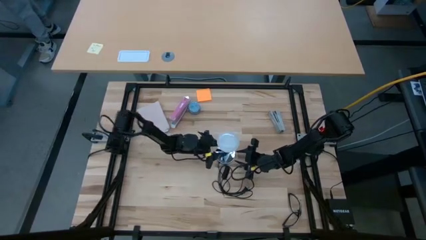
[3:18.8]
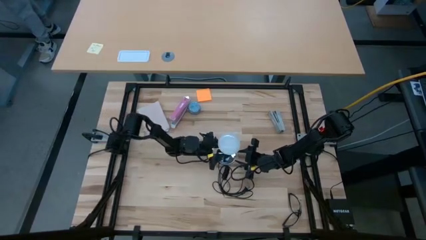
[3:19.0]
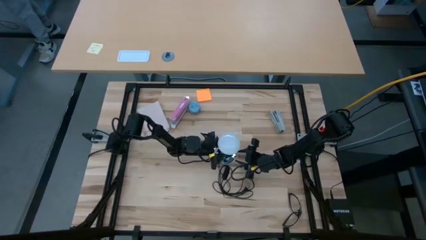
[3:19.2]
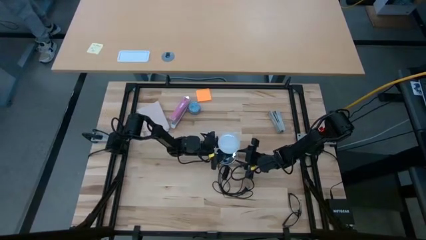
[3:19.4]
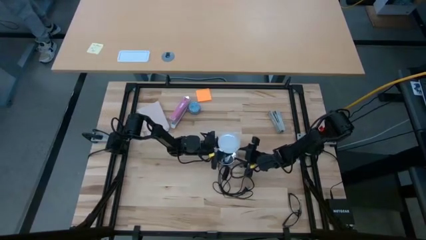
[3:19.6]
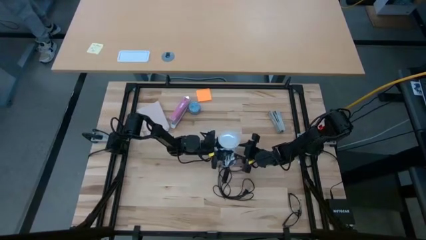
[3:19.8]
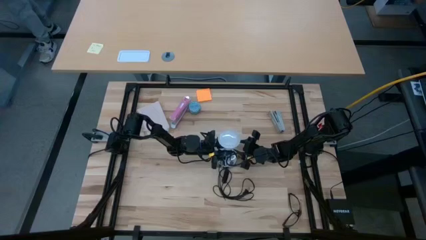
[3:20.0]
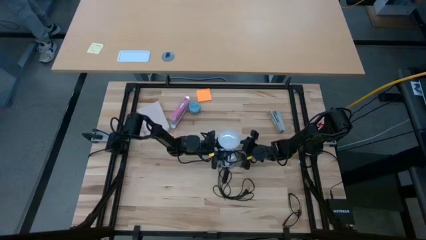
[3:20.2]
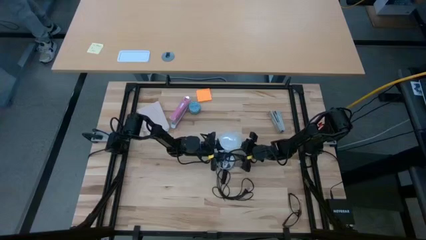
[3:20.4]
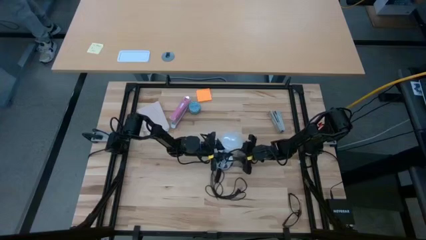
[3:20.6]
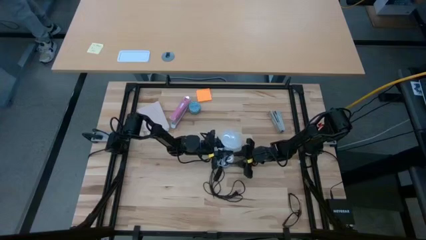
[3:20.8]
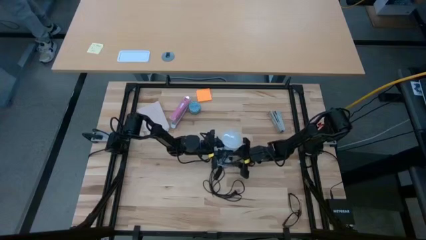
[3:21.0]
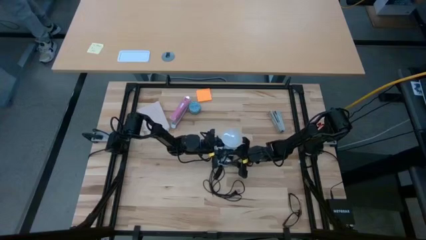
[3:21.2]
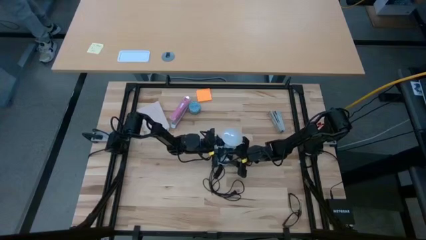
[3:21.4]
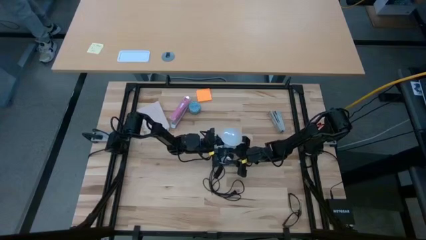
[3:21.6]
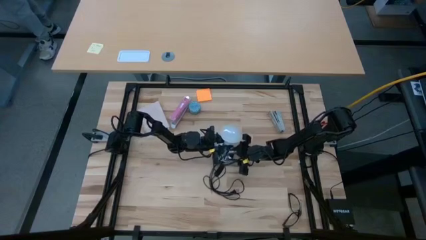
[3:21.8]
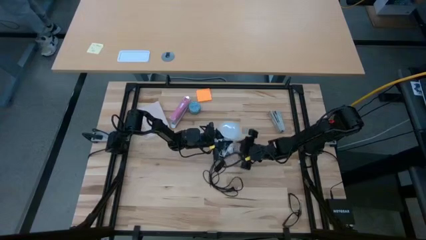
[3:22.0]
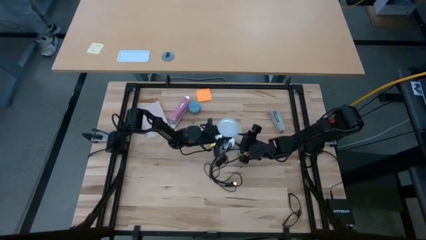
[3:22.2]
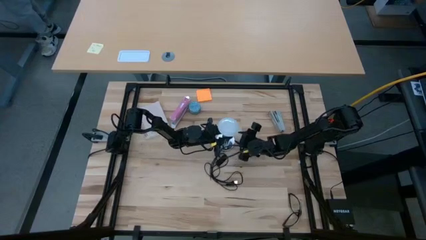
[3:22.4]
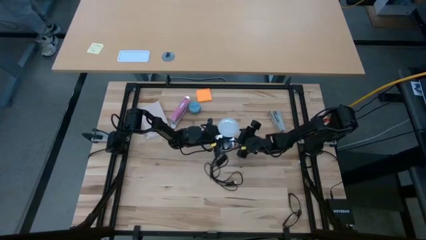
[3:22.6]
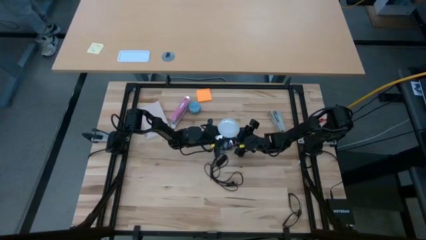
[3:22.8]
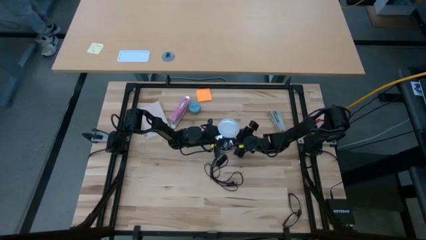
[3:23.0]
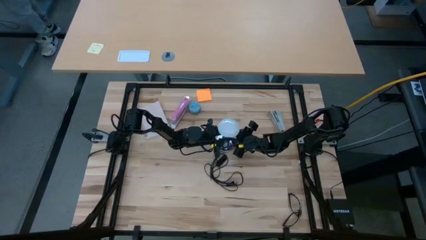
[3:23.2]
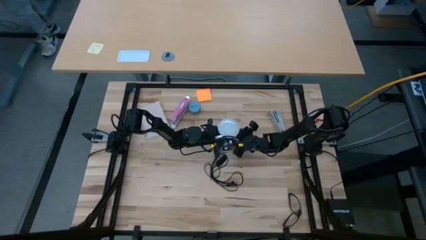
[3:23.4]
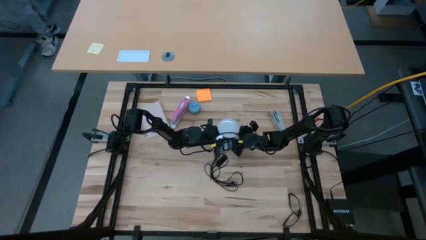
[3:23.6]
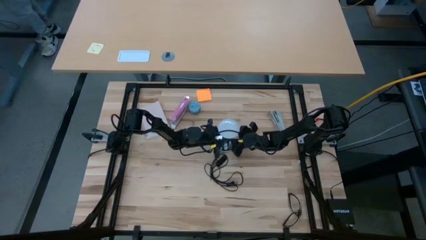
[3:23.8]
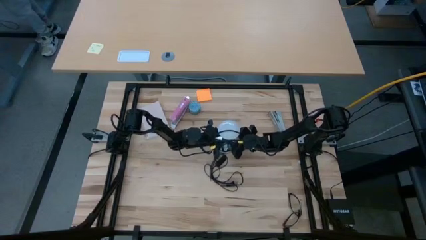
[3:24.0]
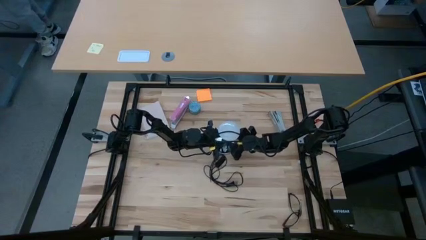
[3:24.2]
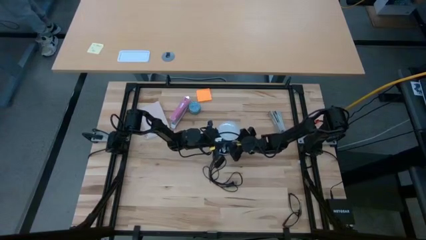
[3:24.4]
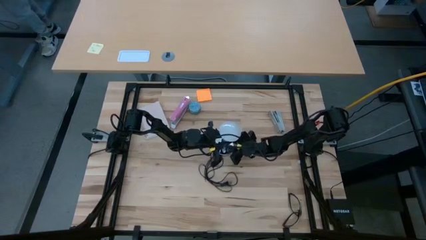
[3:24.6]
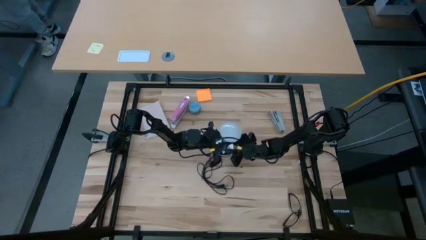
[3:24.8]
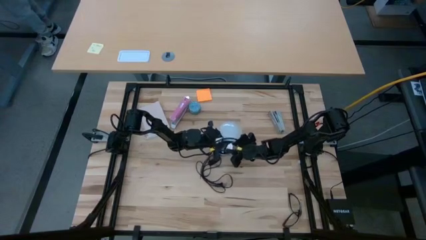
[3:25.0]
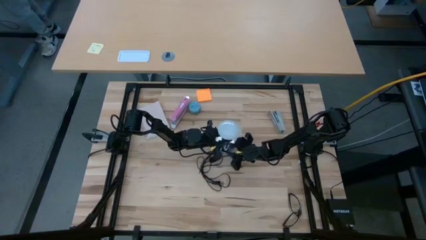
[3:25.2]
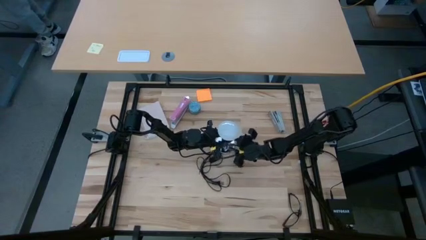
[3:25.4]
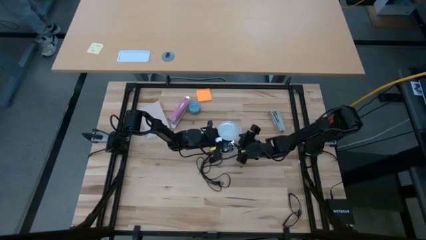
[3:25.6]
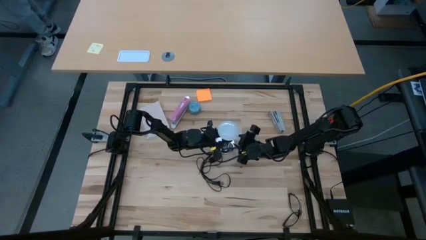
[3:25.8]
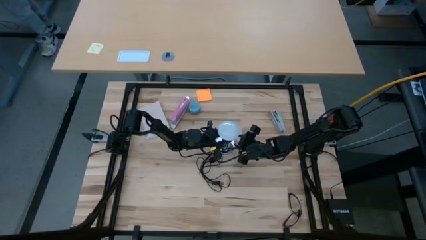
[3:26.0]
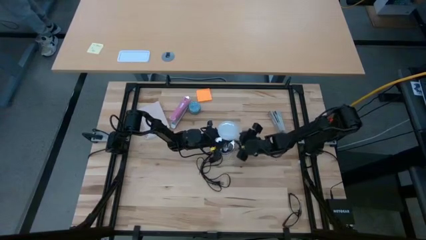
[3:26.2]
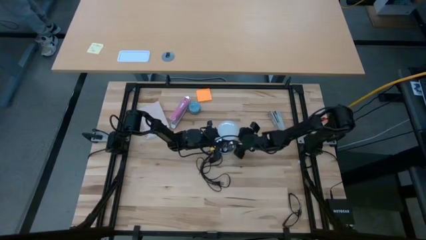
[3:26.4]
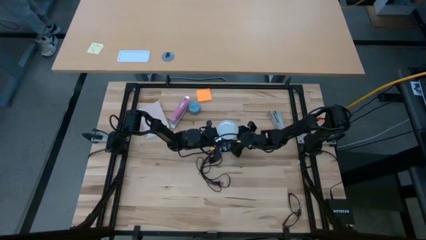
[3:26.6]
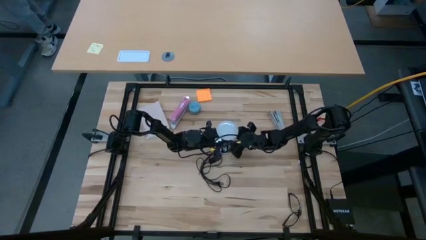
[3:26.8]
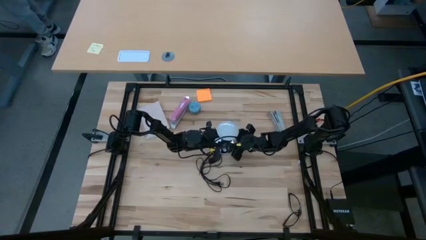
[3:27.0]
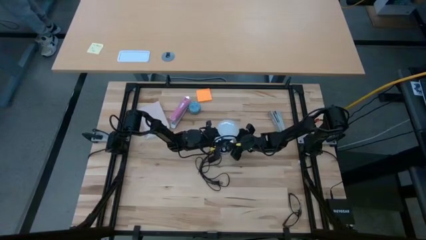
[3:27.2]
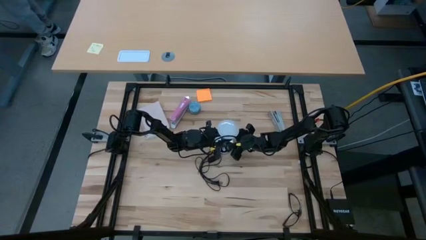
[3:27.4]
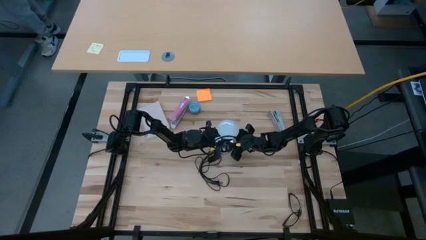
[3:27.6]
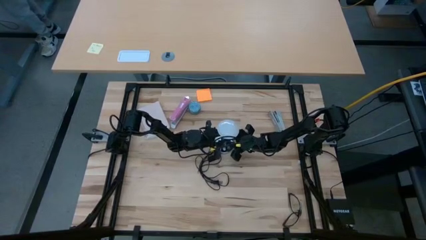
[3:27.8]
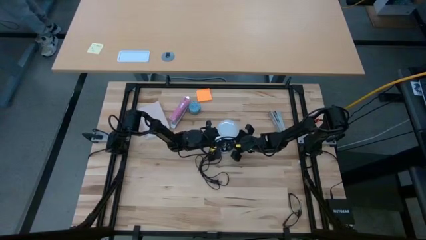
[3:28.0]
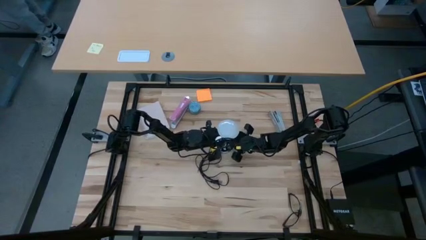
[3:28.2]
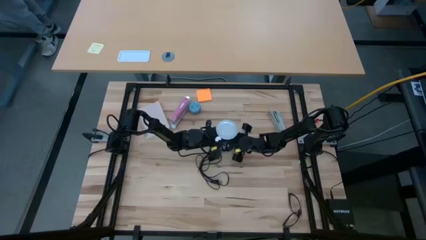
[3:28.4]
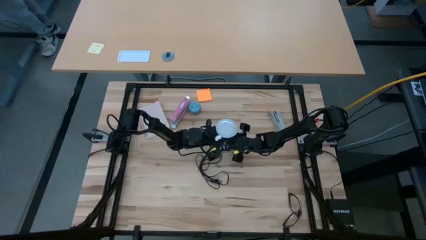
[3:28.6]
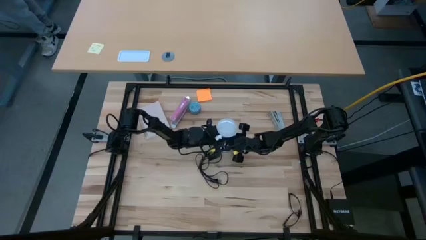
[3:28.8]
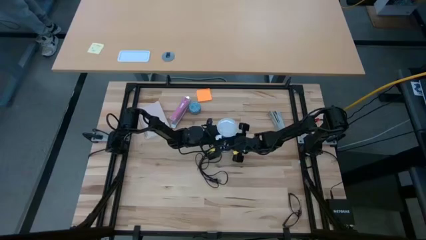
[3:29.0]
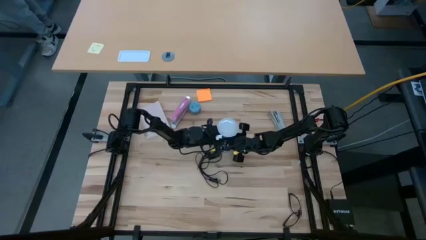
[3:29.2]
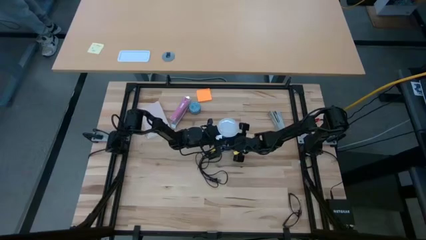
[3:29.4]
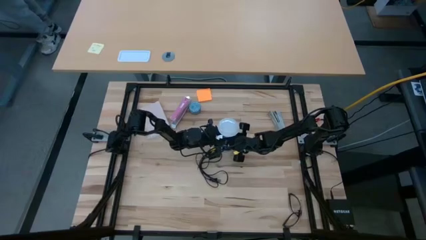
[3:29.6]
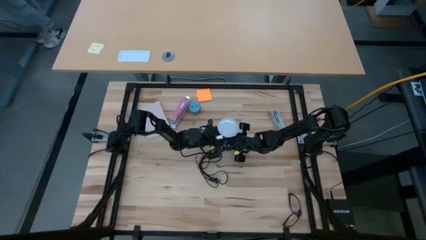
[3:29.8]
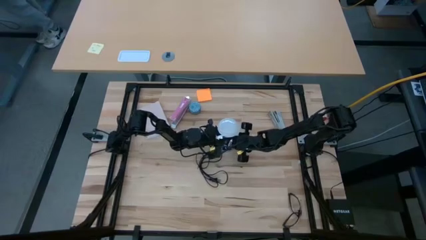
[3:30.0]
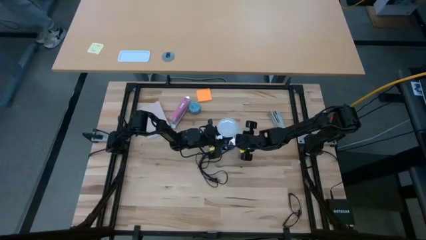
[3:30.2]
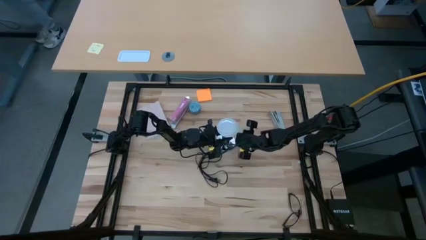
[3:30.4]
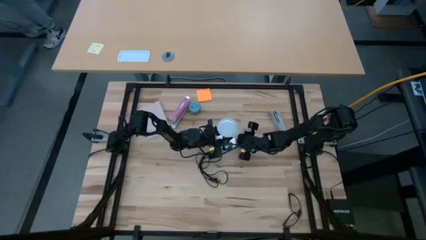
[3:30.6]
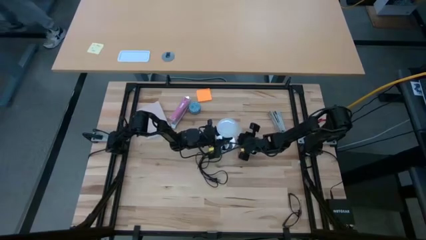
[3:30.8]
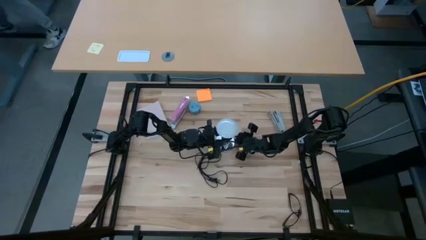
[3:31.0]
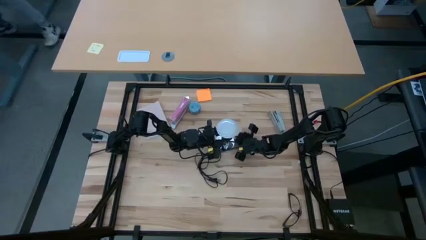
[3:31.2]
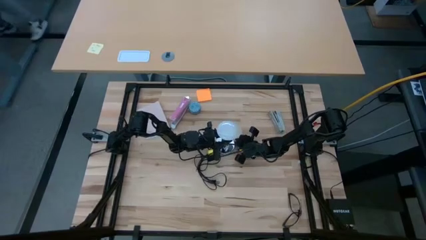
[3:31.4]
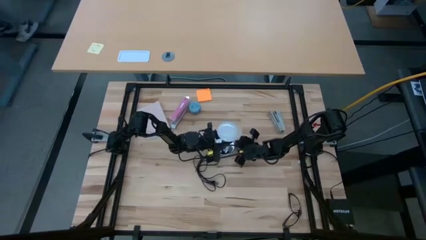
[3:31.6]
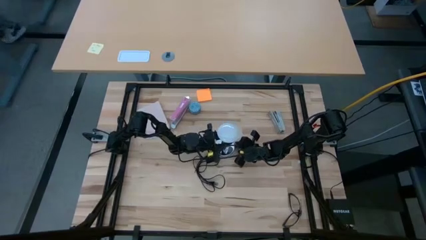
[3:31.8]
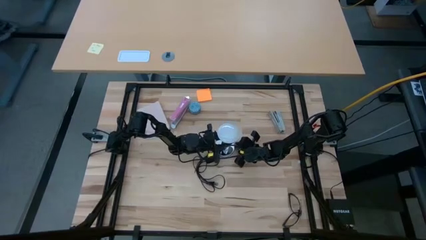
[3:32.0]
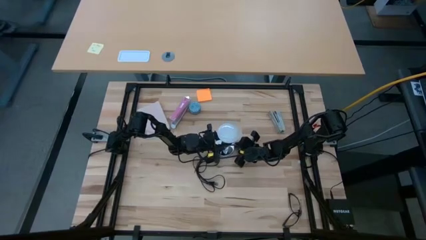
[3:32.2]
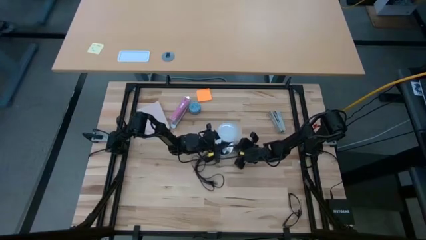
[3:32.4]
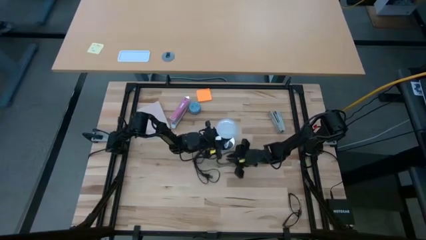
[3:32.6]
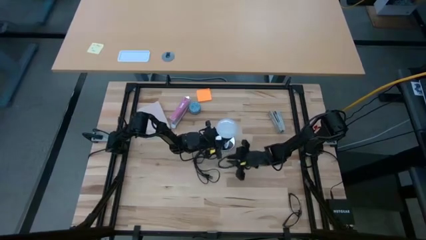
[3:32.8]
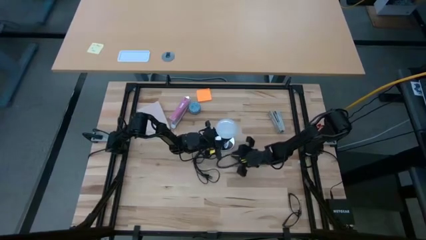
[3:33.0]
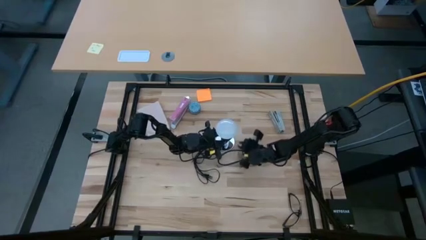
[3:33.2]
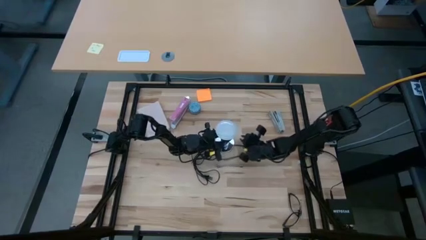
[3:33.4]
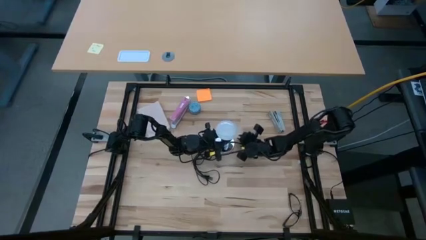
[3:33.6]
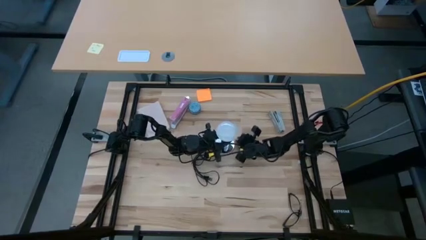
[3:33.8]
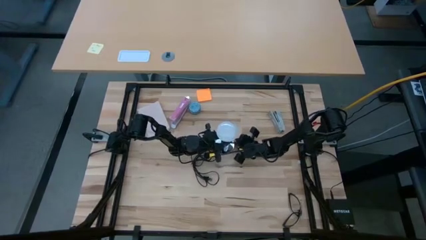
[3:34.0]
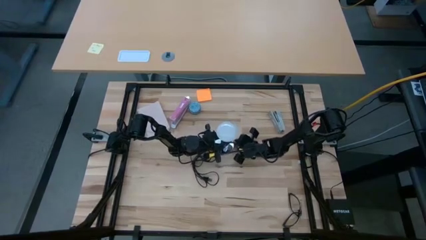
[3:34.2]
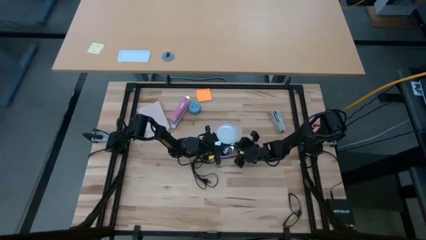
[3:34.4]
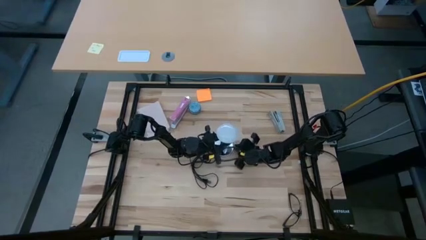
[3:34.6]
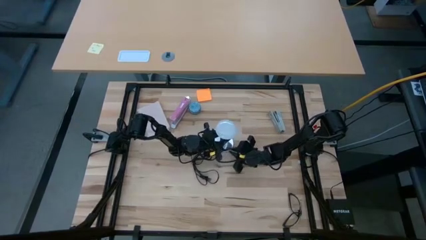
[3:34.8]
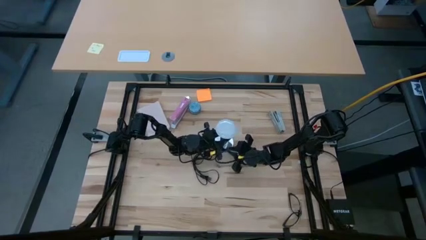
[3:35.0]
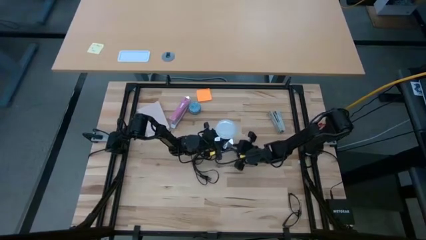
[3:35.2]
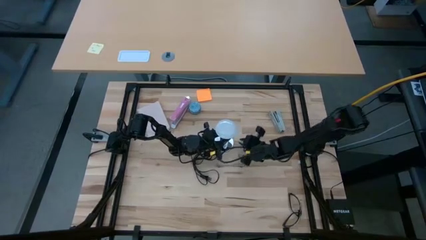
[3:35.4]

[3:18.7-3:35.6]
Task: Screw lightbulb
Remove the lightbulb from the lamp
